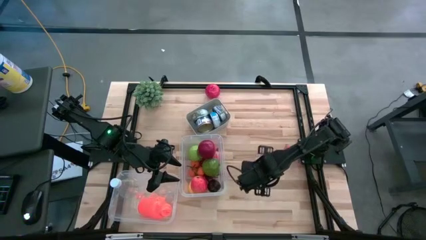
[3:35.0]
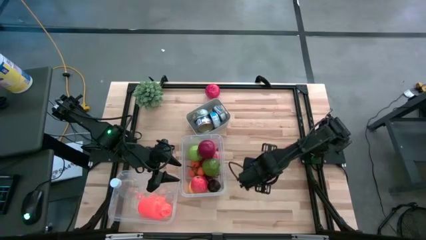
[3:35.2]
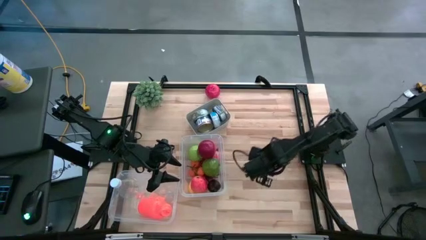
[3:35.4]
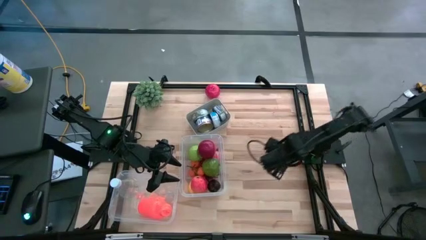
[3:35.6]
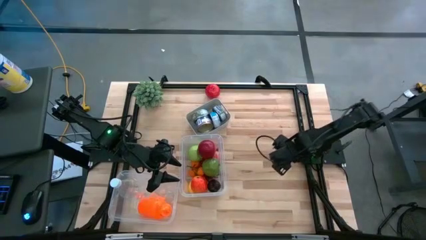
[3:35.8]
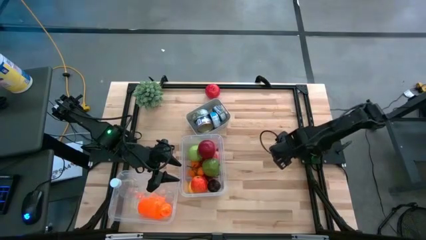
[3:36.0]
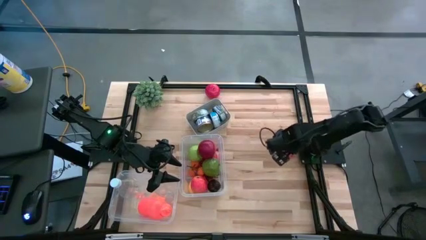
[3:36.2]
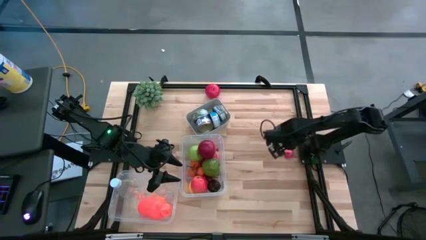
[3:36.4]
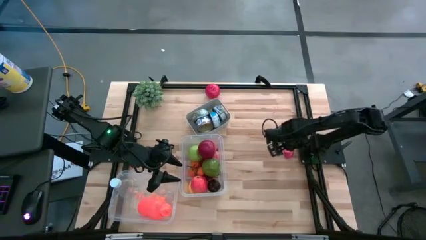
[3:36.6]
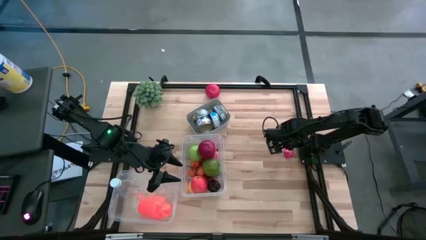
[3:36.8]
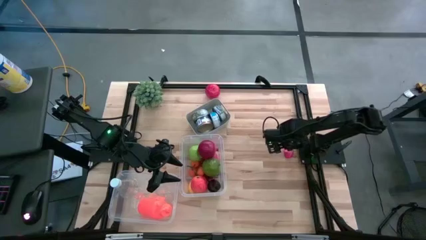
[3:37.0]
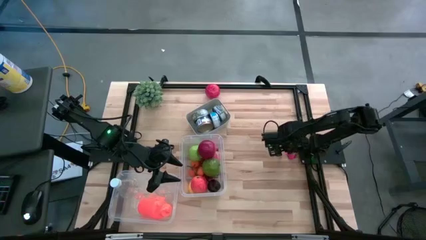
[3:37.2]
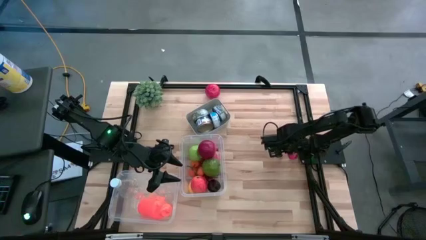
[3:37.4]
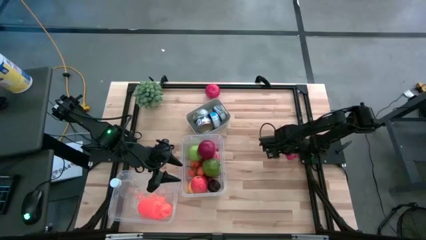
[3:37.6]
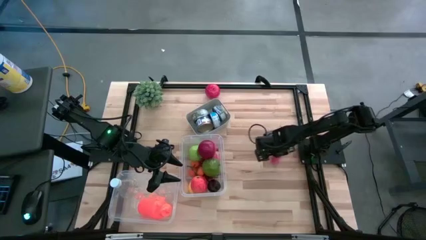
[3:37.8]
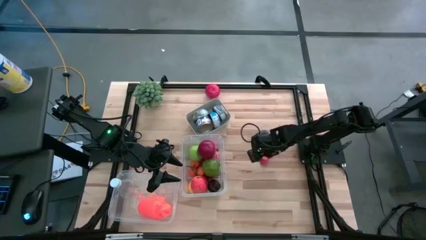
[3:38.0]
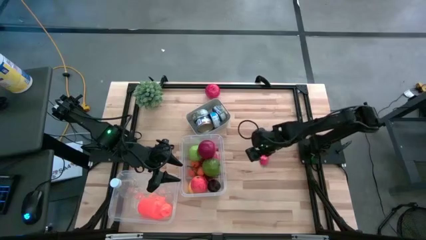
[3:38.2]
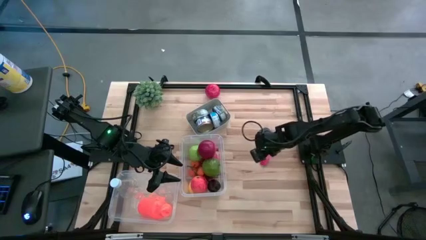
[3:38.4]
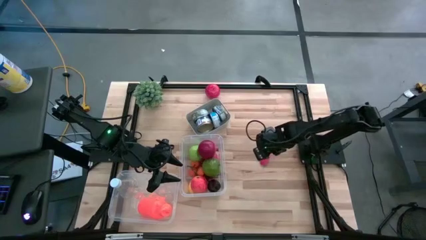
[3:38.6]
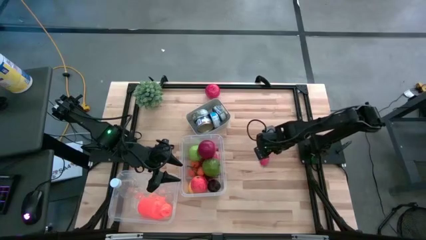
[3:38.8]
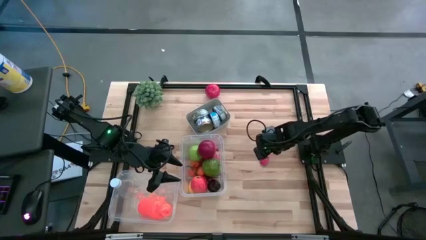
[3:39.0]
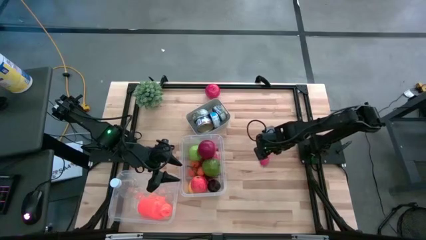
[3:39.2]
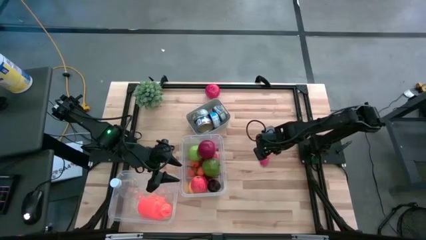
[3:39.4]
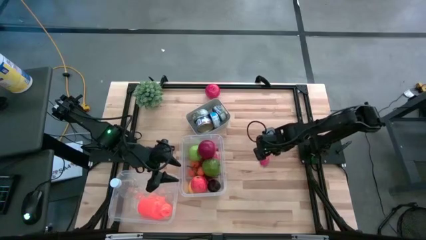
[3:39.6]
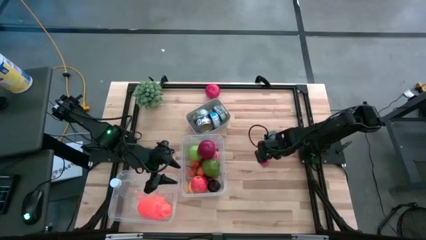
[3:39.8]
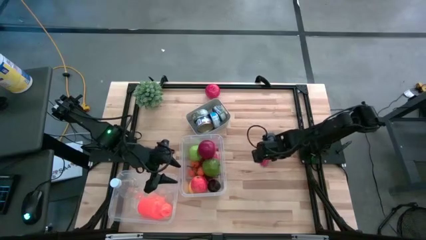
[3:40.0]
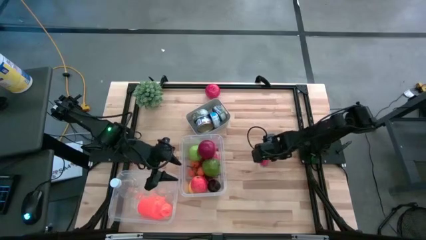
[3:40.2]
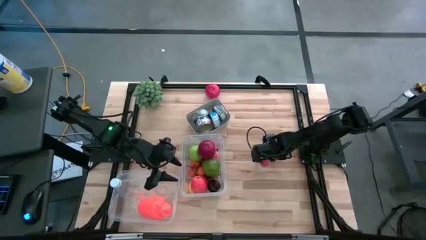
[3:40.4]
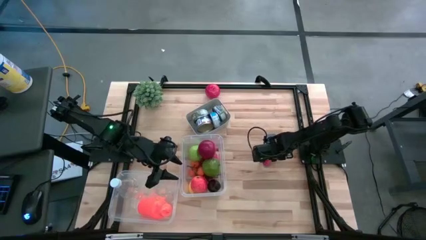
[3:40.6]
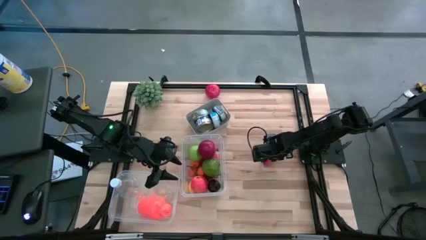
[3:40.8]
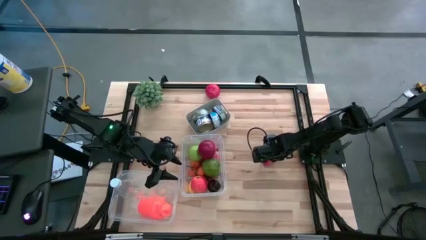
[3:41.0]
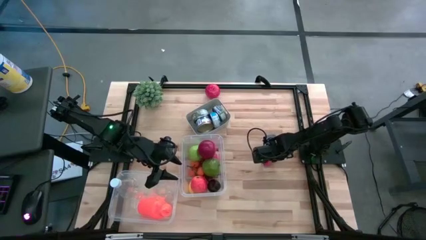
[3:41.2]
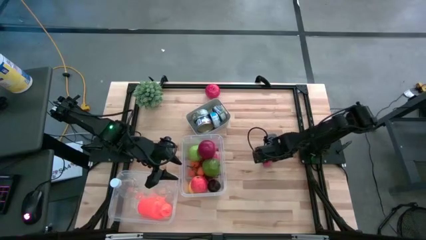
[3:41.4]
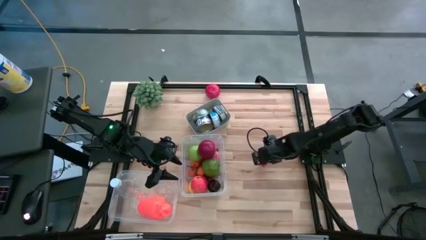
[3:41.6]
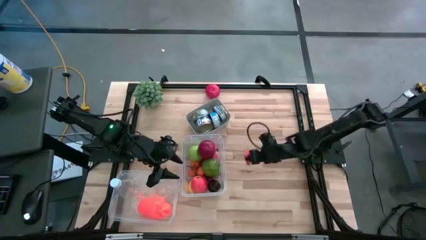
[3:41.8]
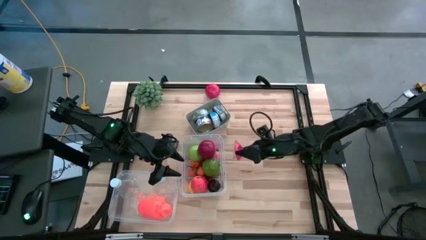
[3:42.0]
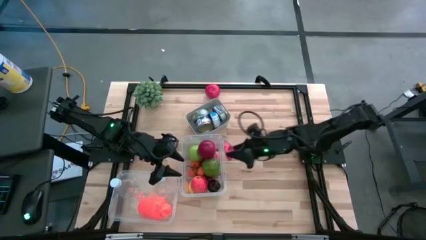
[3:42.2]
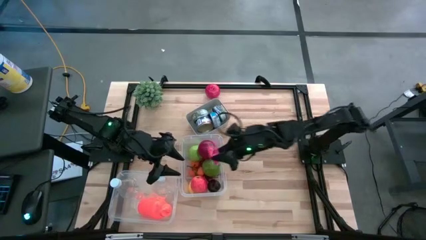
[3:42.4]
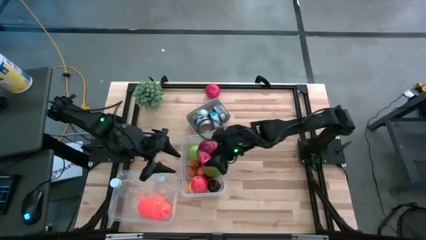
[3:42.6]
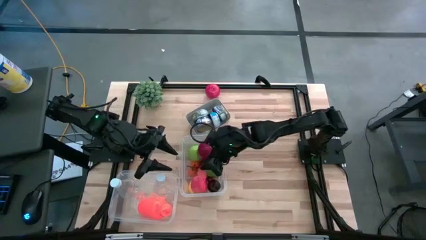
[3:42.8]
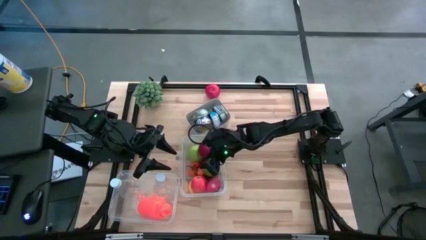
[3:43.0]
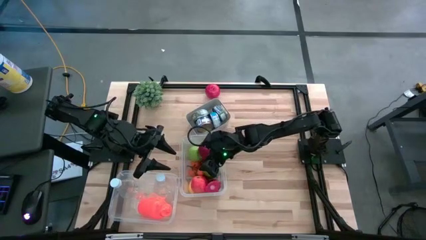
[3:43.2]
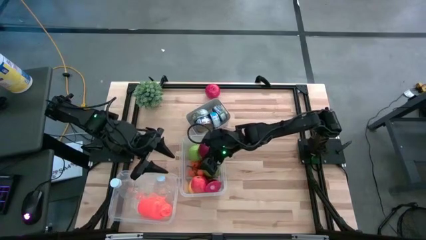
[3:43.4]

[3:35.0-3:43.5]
Task: Pick & Place Food Item
Put the red dragon fruit into the right transparent bin

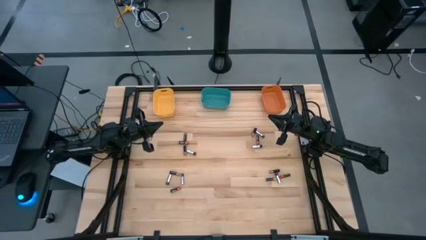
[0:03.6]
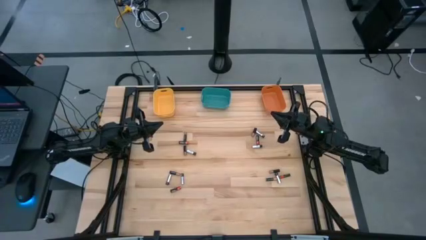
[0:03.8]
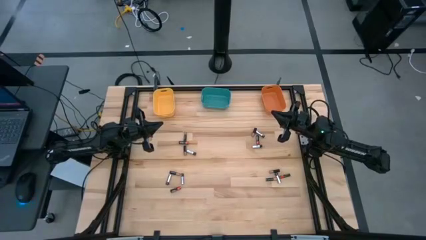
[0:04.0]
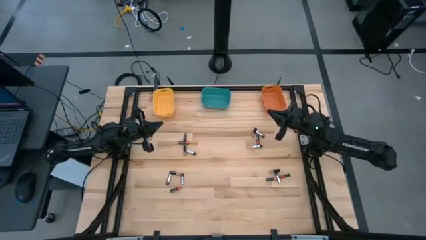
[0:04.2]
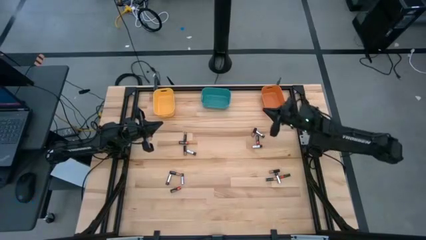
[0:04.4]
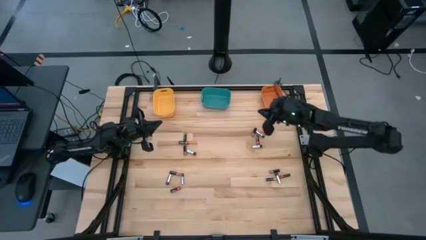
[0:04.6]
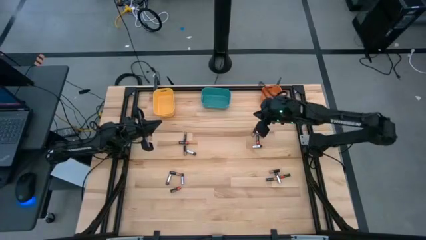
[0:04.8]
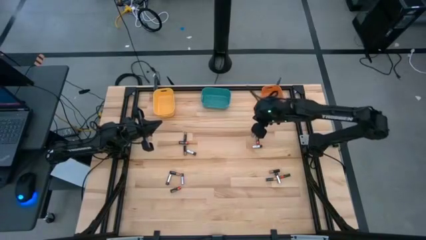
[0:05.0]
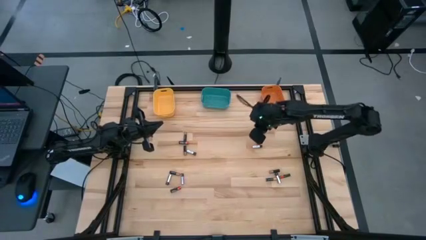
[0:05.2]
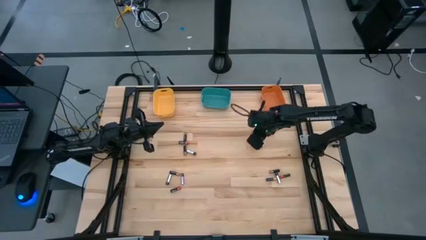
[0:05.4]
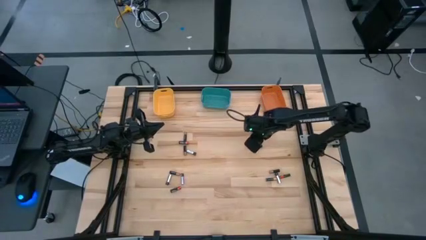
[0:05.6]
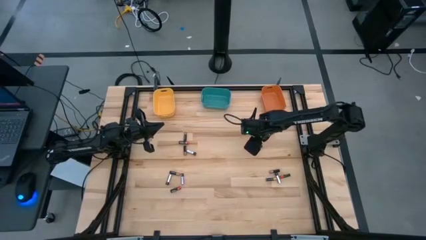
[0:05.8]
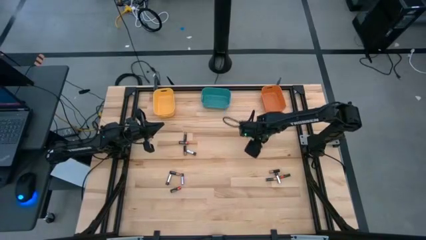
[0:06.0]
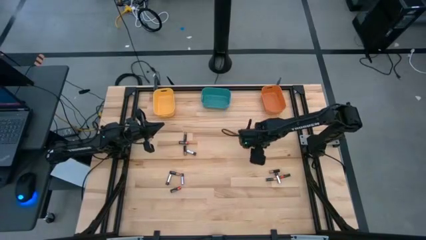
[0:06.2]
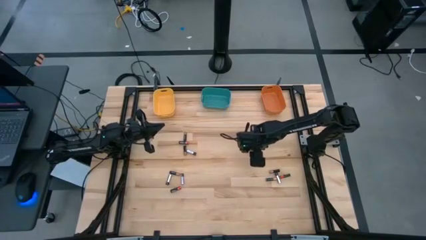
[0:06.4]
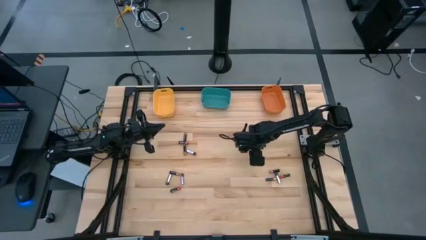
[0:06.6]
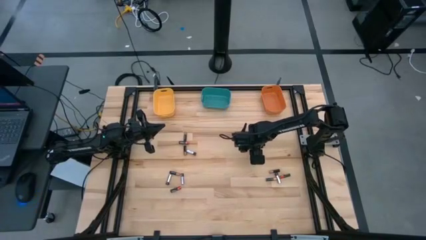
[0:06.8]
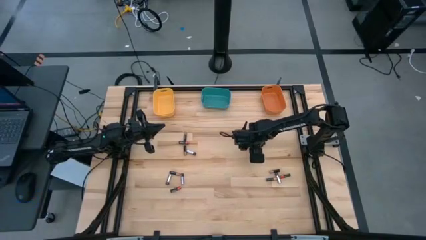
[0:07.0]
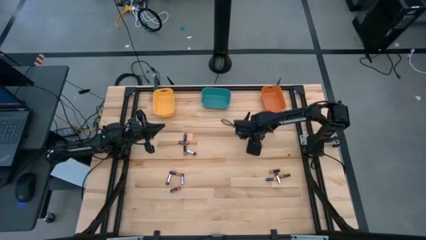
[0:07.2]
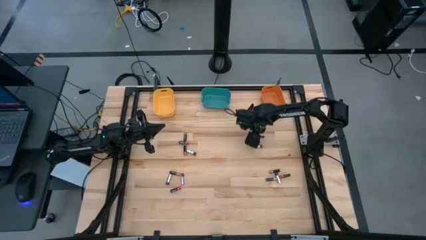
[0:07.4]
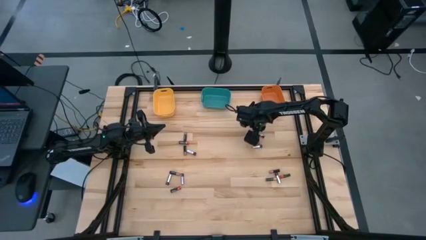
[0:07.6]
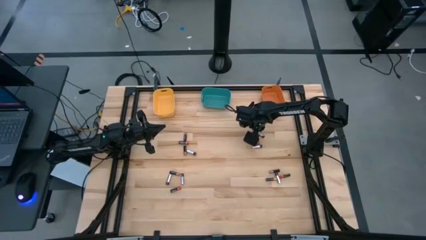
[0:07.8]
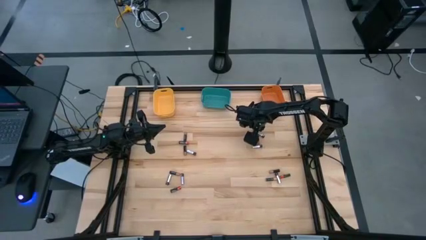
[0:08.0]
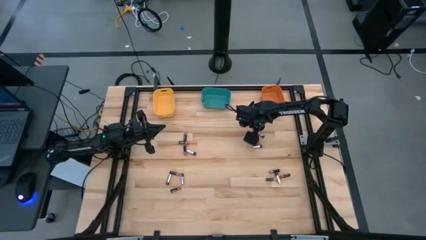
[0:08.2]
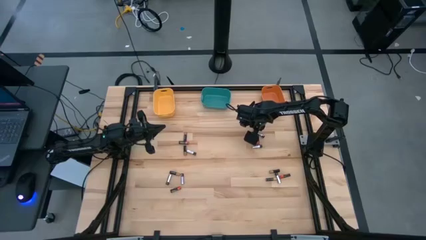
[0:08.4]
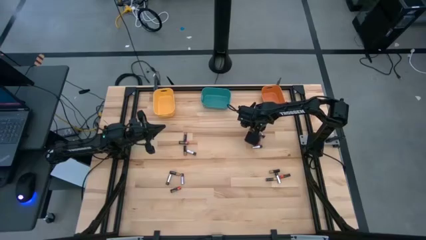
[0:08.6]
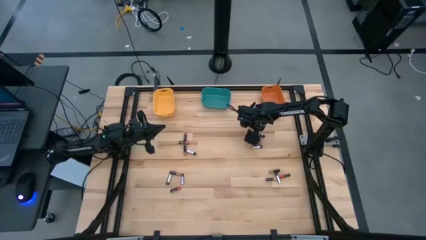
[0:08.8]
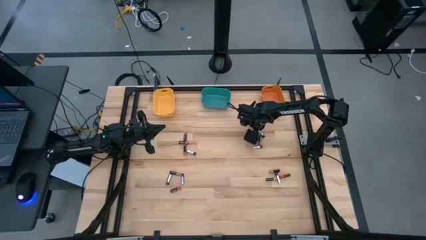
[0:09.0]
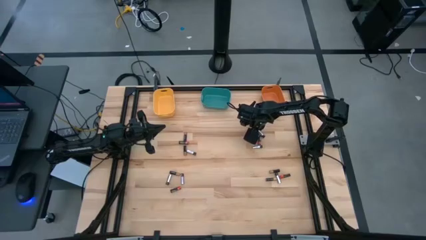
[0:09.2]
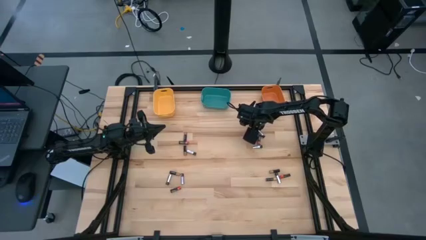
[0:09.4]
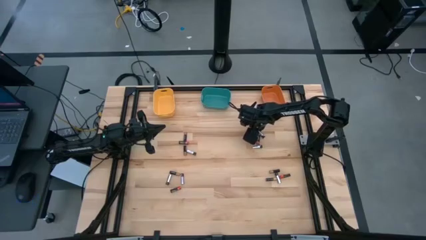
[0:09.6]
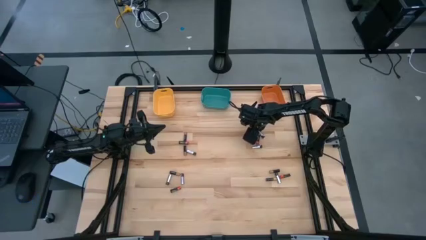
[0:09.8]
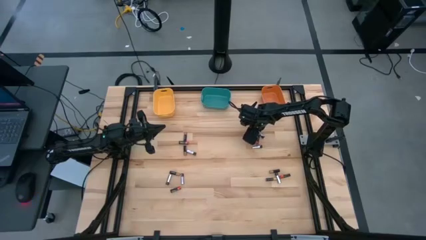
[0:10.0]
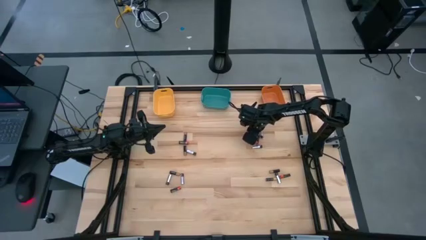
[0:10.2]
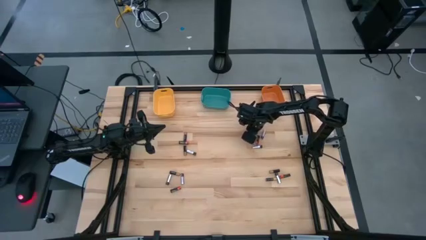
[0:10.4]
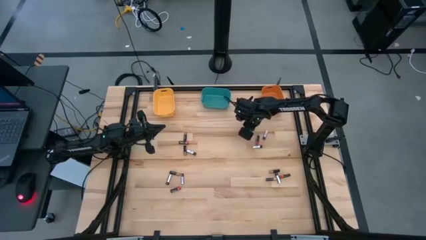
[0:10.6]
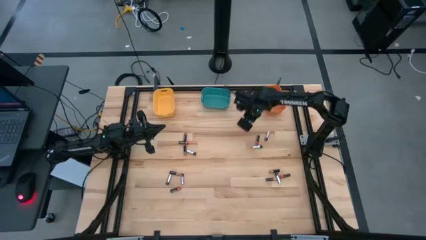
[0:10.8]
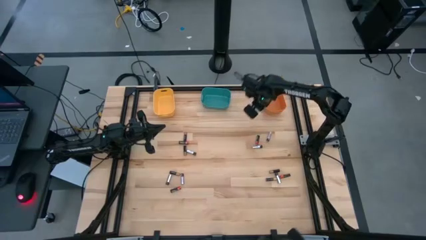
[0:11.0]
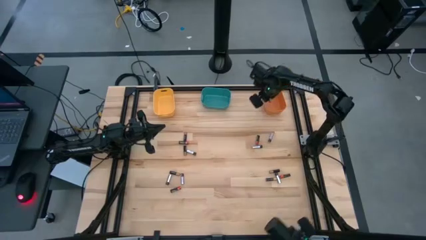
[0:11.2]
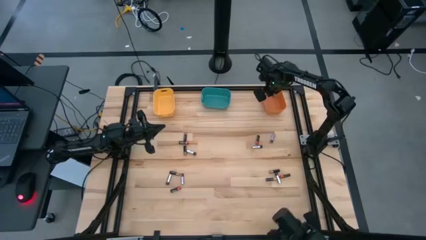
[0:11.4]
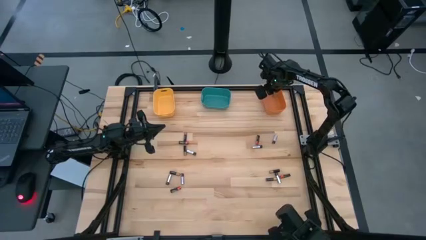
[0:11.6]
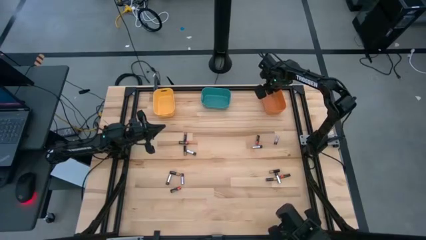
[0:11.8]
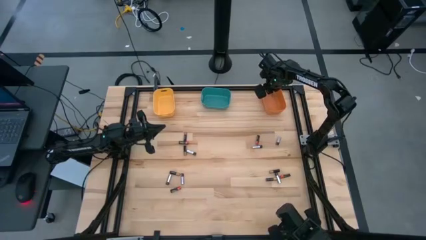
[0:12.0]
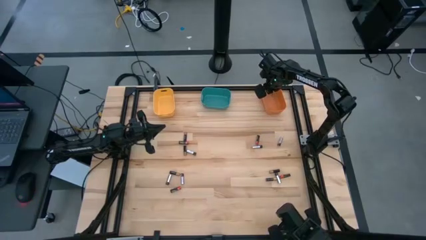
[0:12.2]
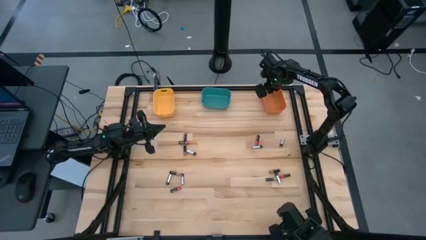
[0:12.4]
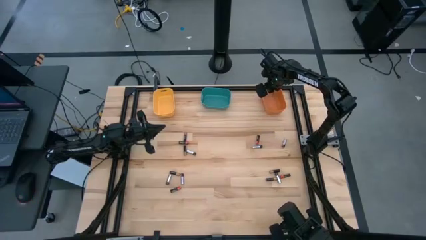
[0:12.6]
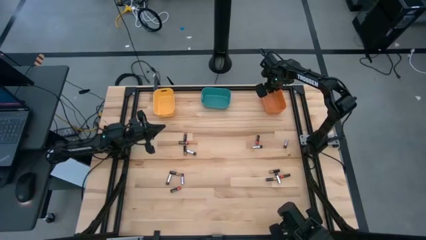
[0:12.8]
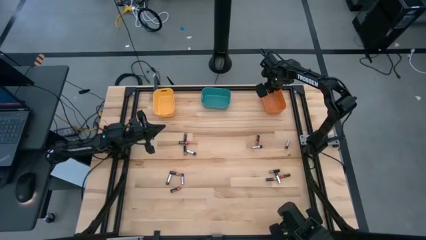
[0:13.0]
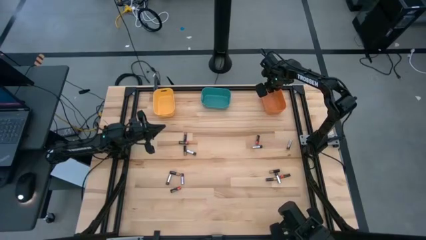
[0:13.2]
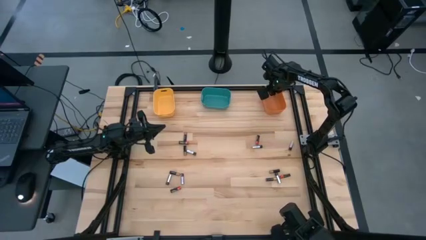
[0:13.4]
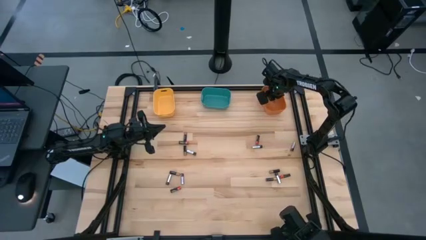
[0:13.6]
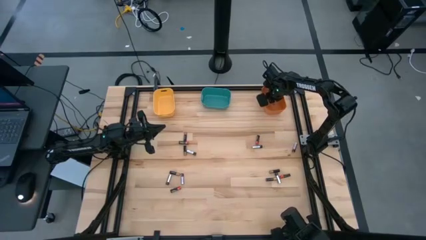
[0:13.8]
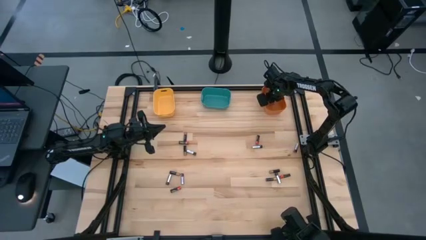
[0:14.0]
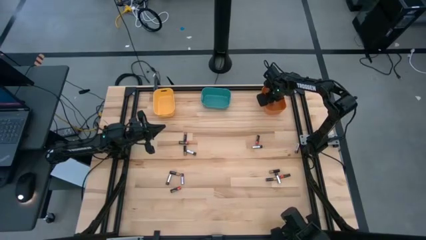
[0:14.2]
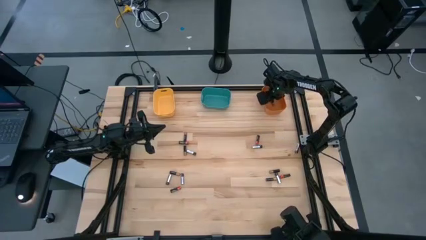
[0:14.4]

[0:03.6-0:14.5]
Task: Sort batteries
Put the brown battery into the orange bin
